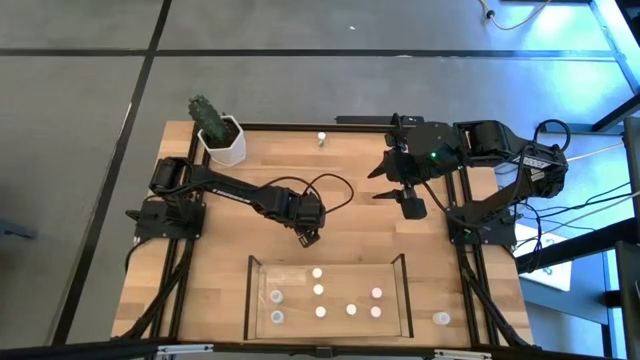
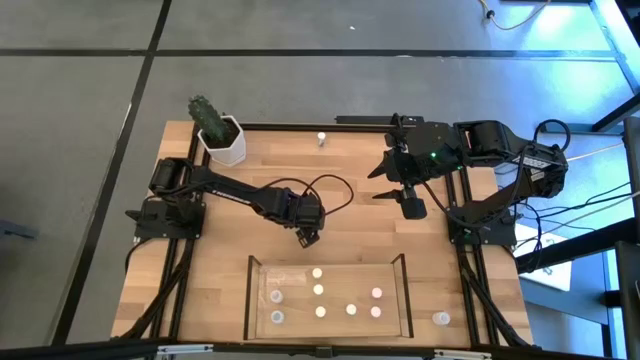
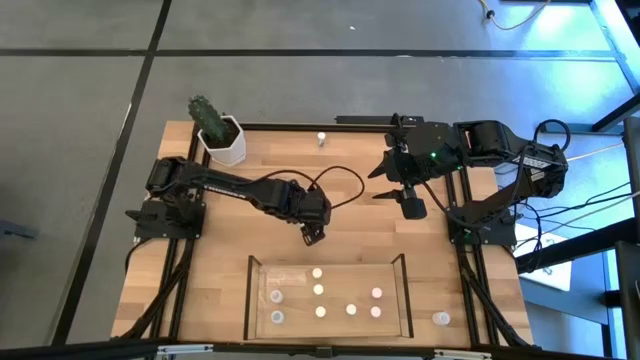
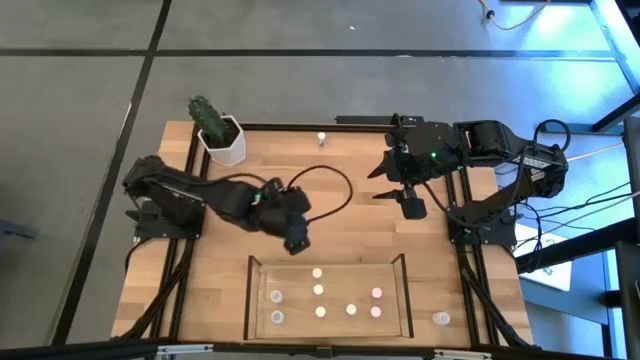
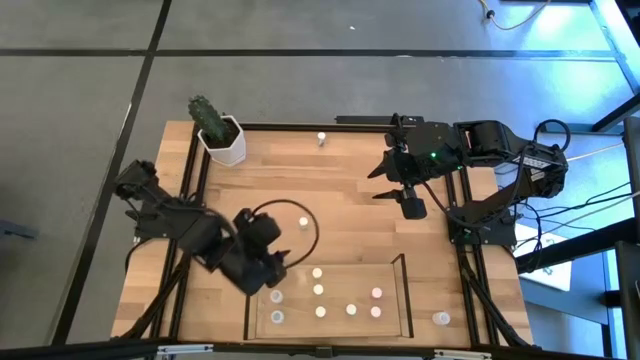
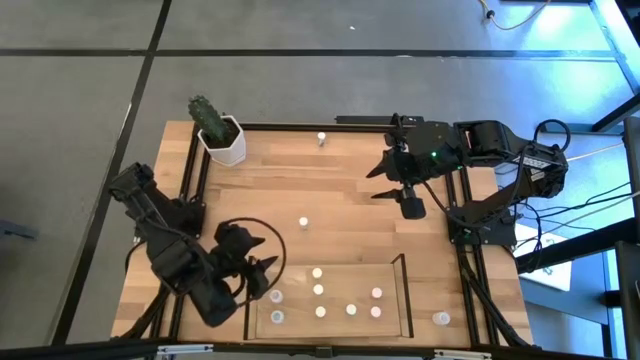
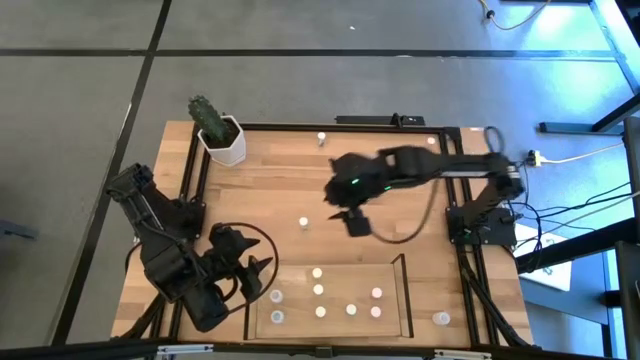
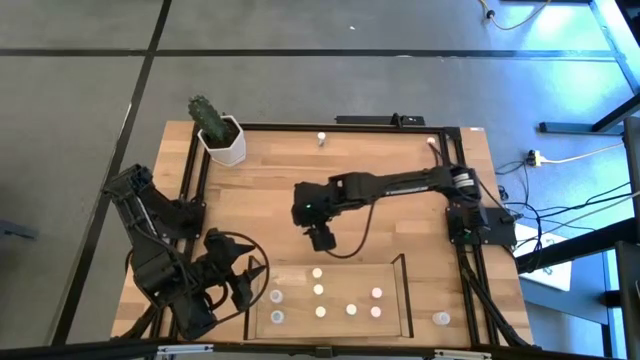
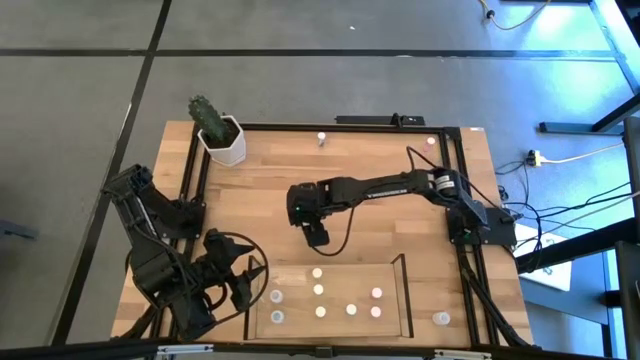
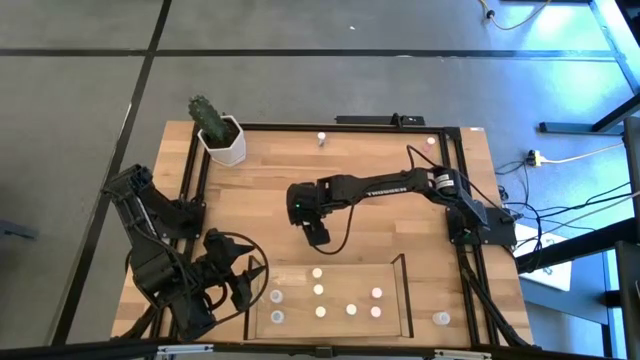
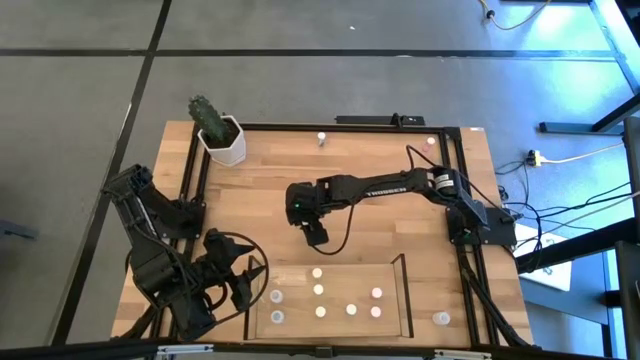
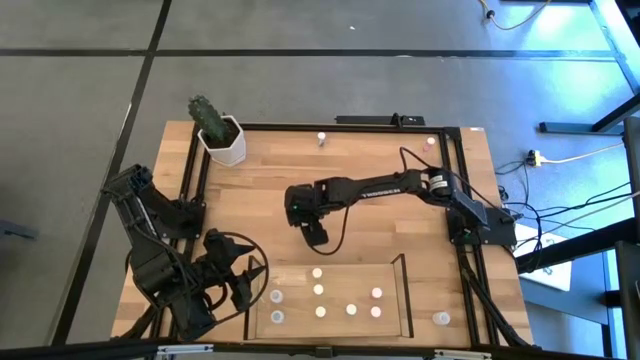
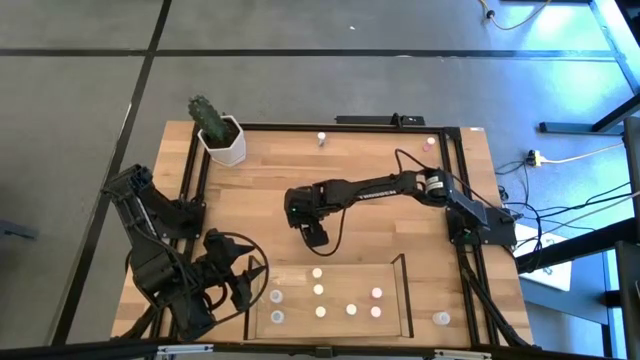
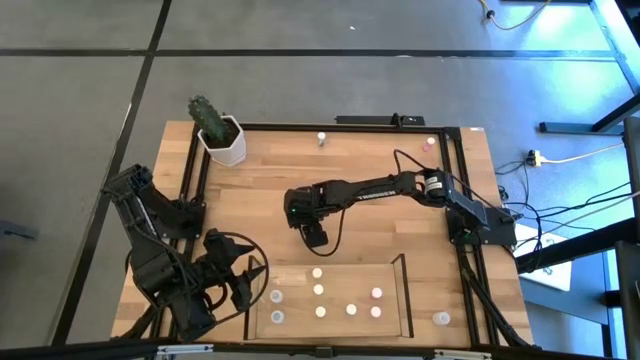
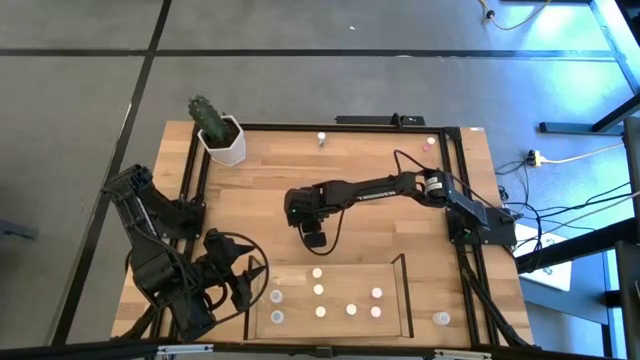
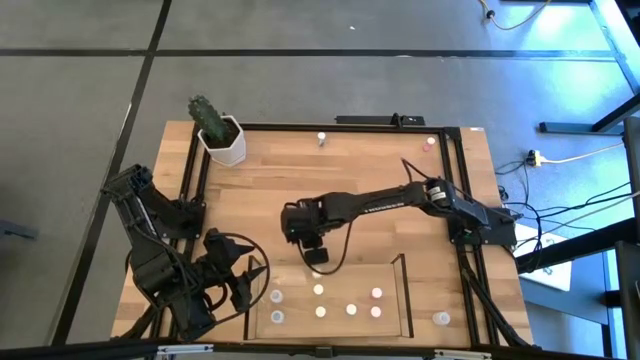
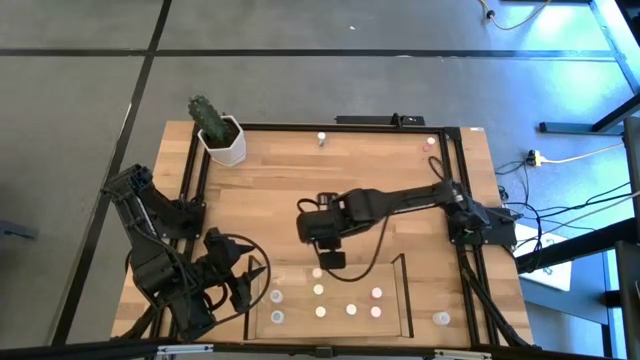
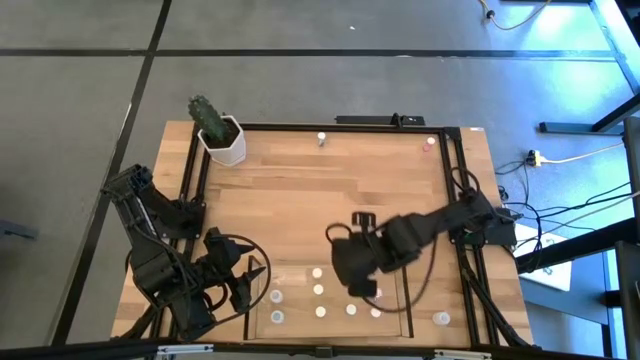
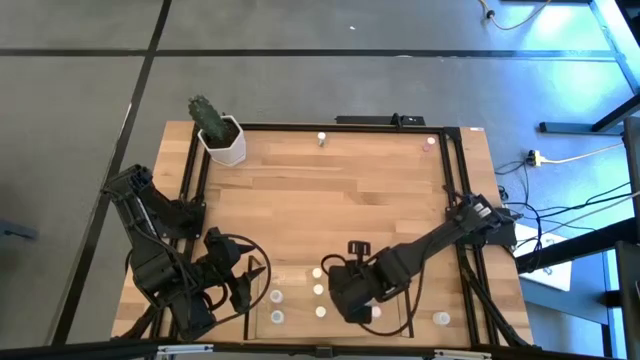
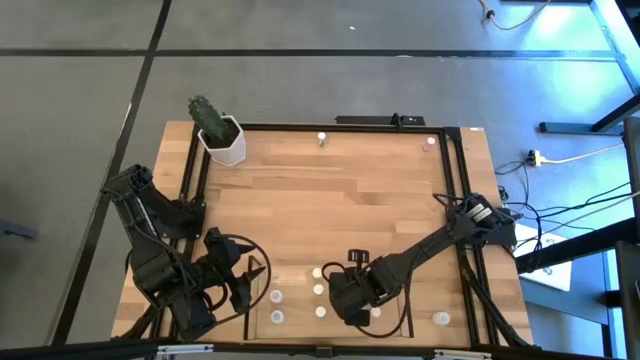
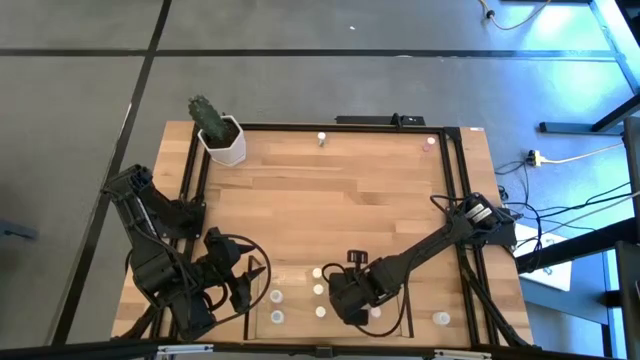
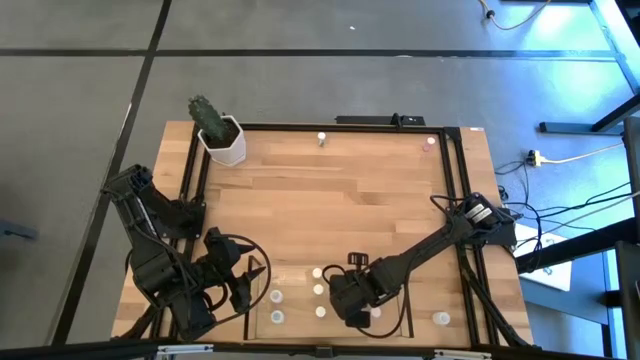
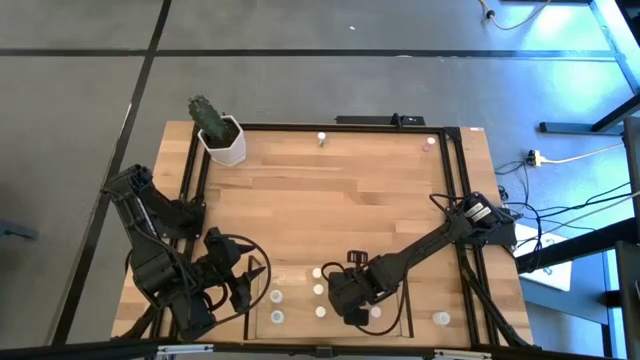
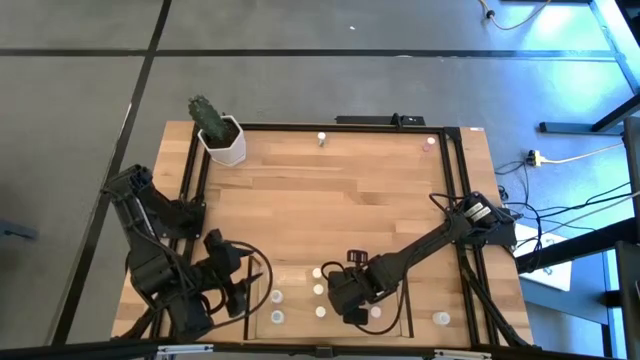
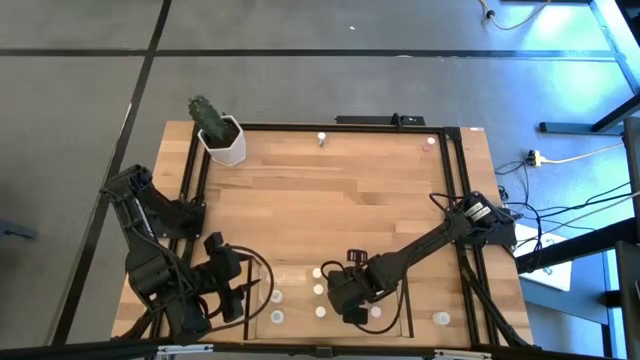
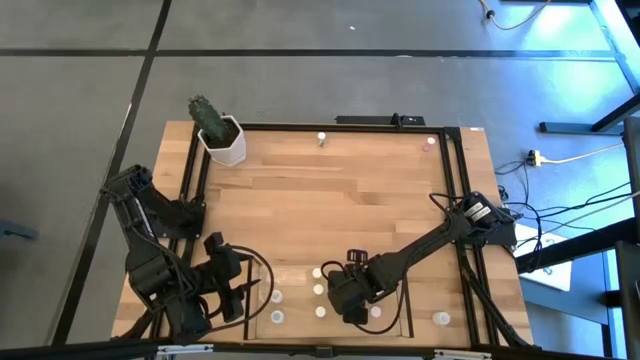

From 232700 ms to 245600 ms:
Task: Pick and place medicine bottles onto shelf by color
Put the bottom blue pill bottle on the shelf aligned with the other blue pill bottle

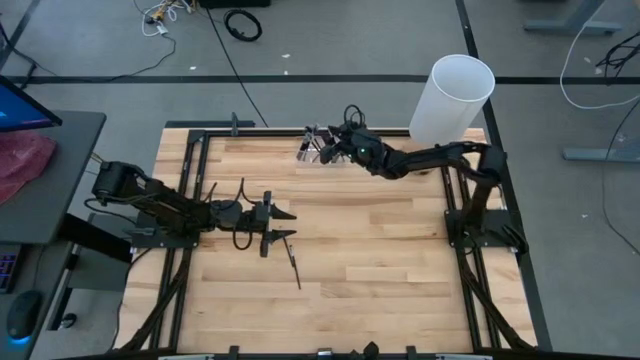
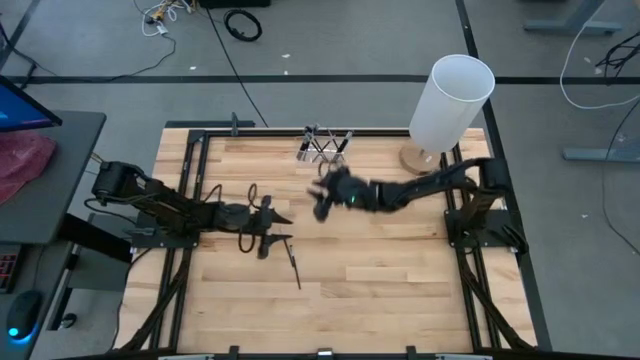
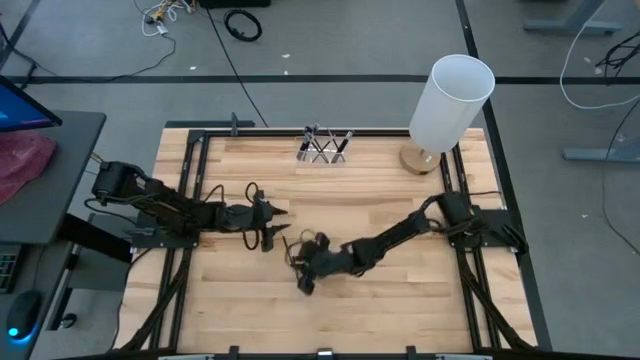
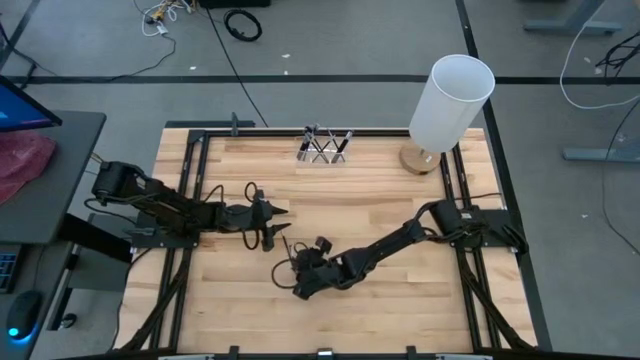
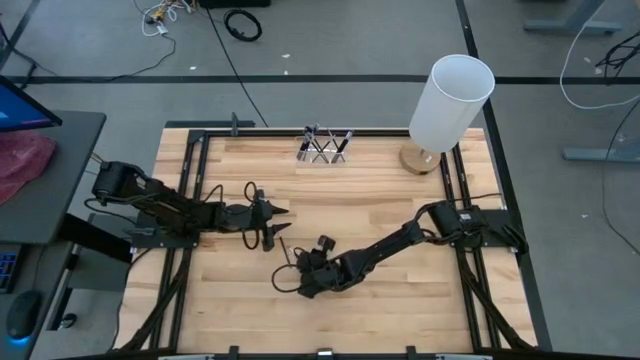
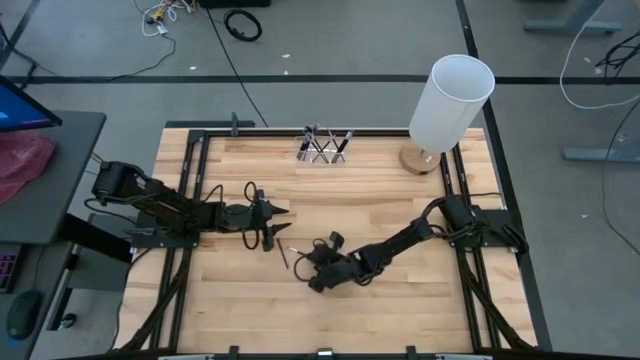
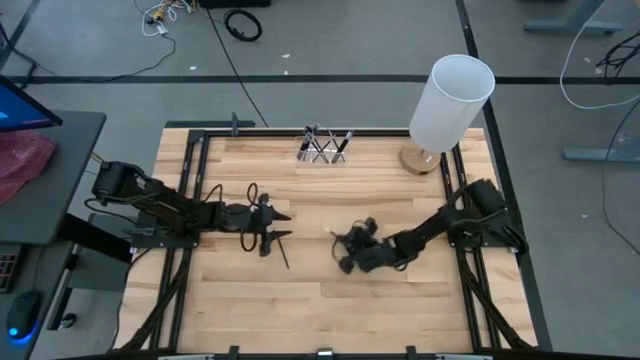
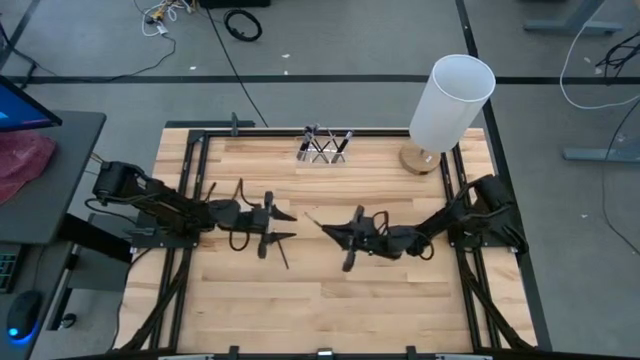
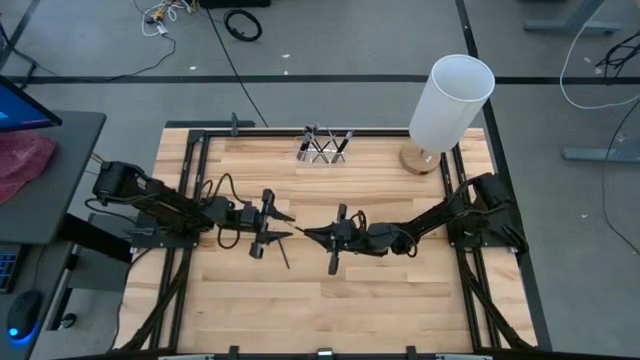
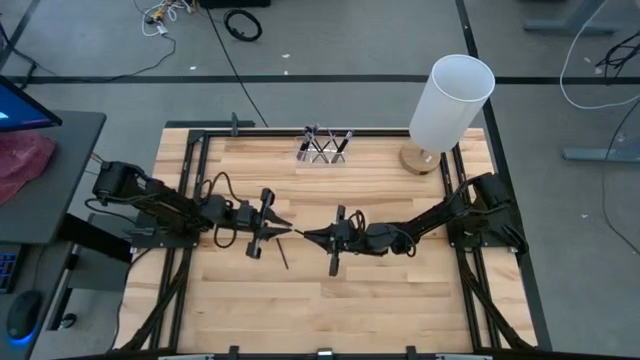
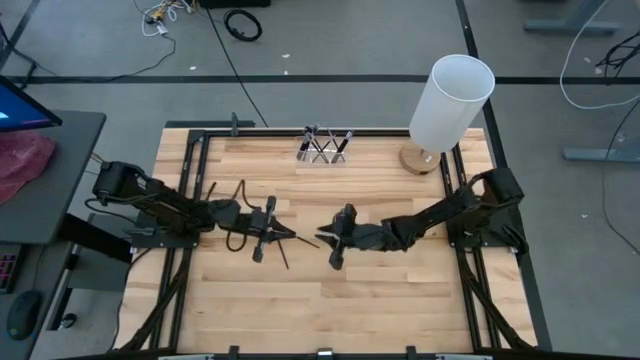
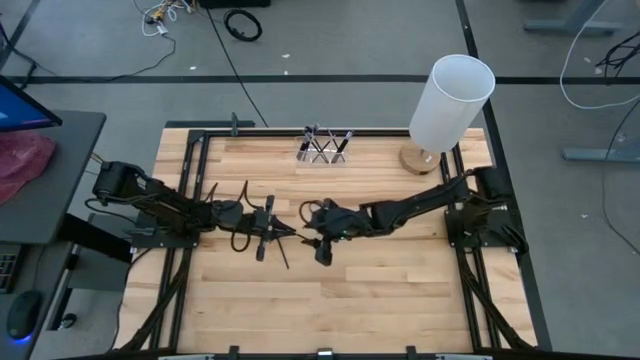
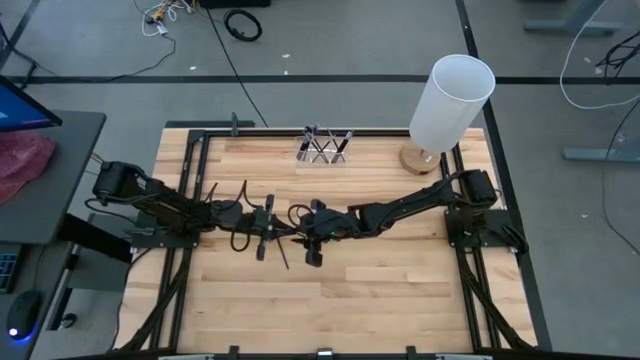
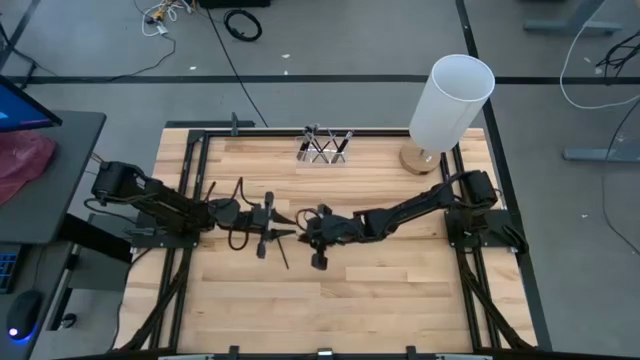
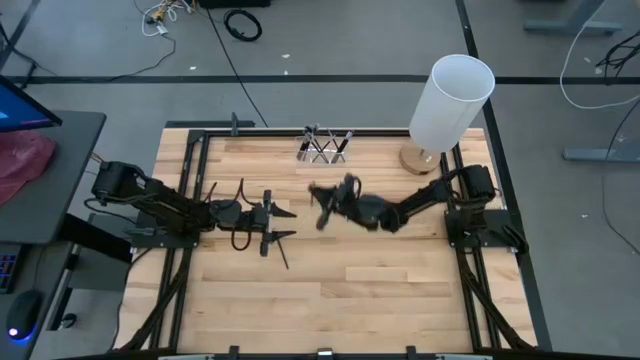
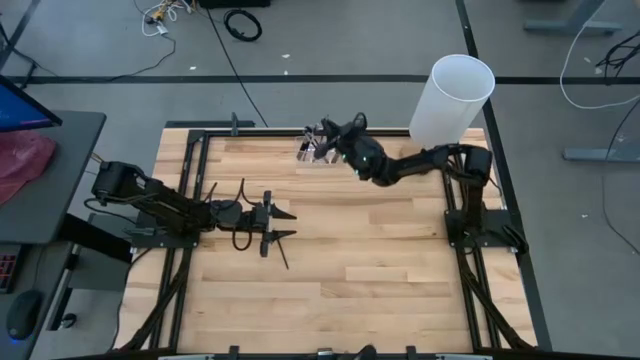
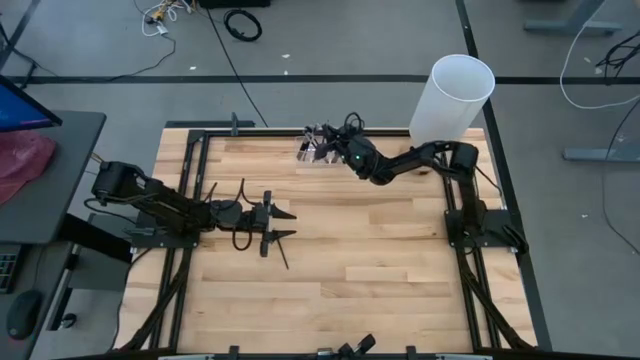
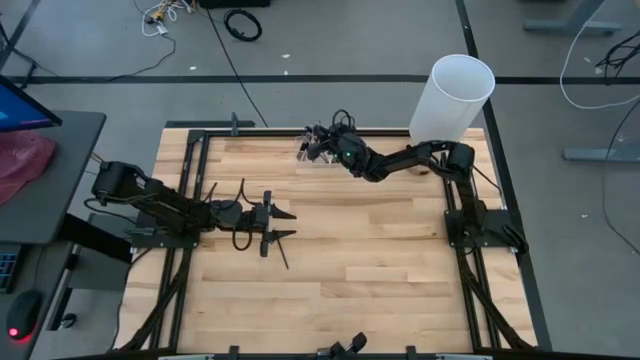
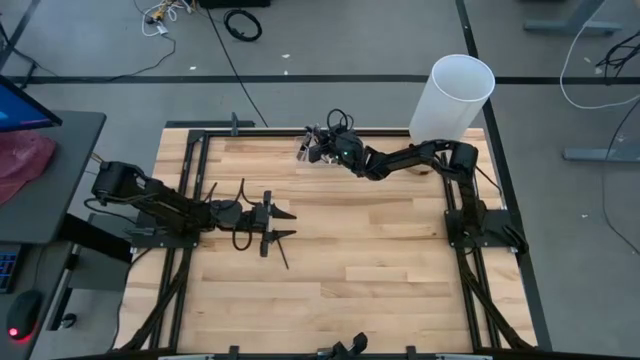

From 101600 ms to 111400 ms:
Task: Pick & Place Makeup Supplies
Put the black makeup brush into the transparent organizer
